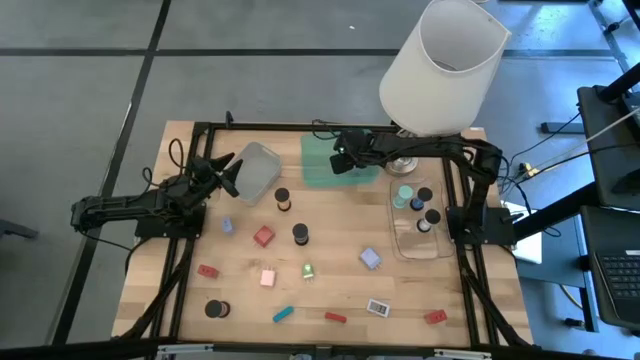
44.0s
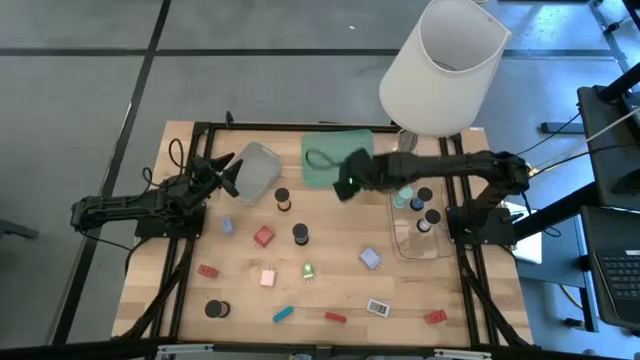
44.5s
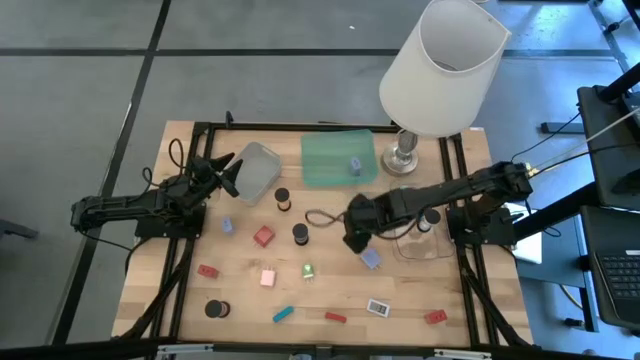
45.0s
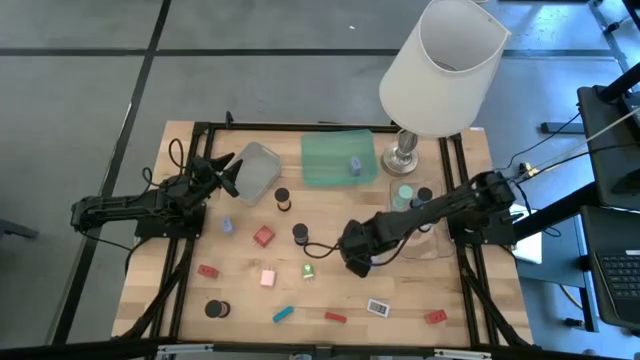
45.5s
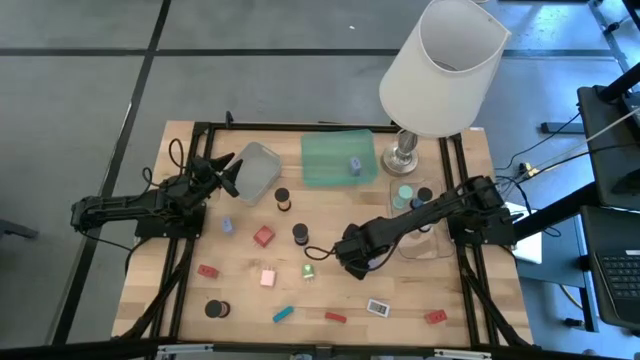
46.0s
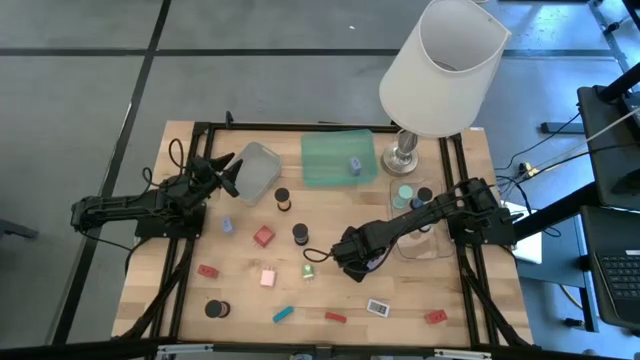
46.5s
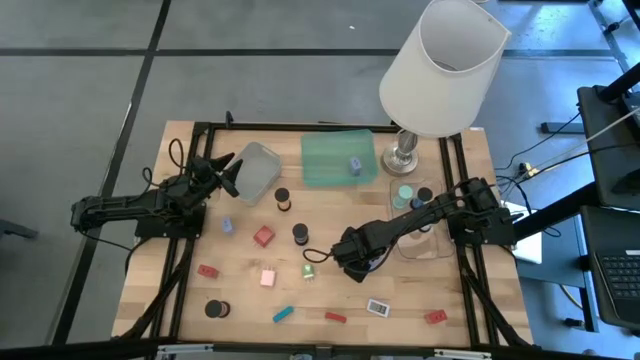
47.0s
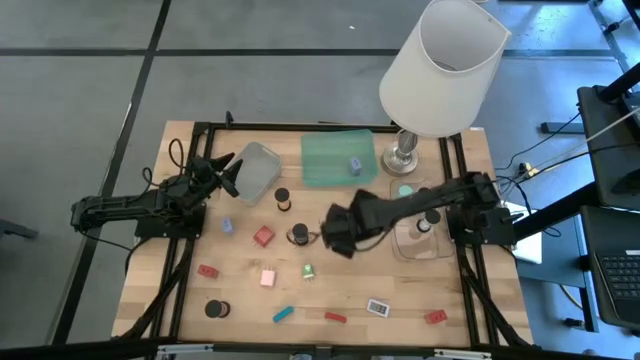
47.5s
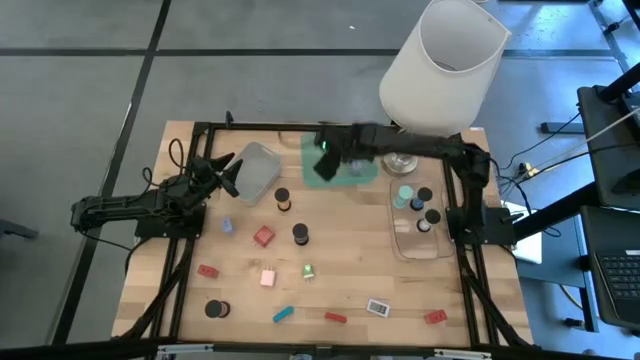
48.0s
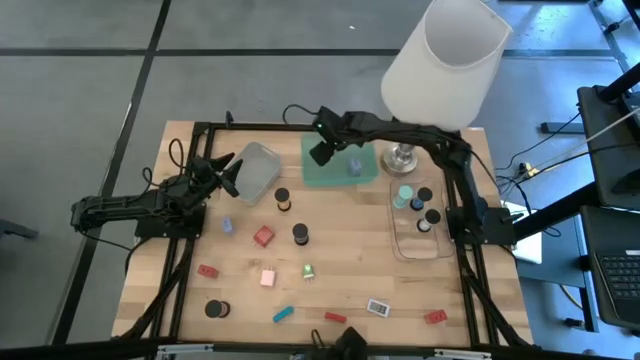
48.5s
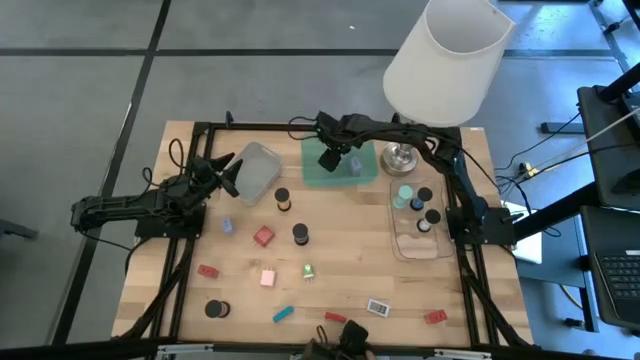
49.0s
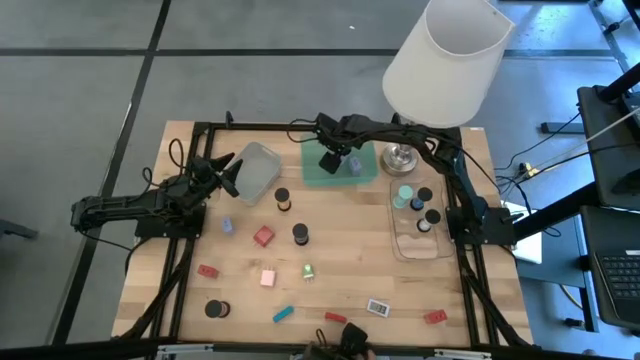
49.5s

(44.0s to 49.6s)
Task: Pick & Place Office items
Put the right purple charger adapter into the green bin

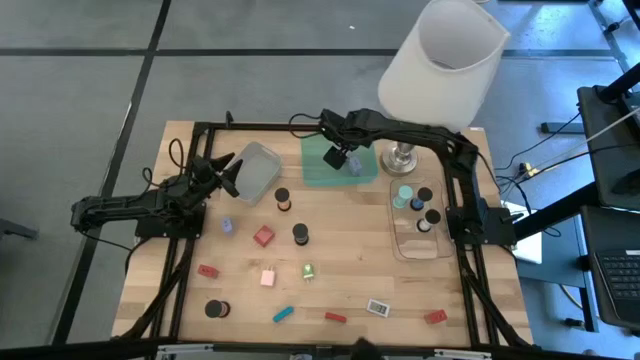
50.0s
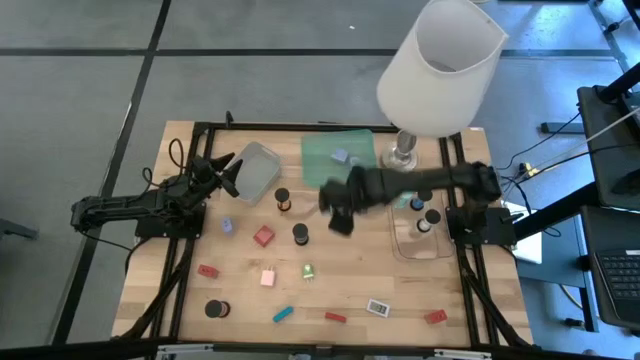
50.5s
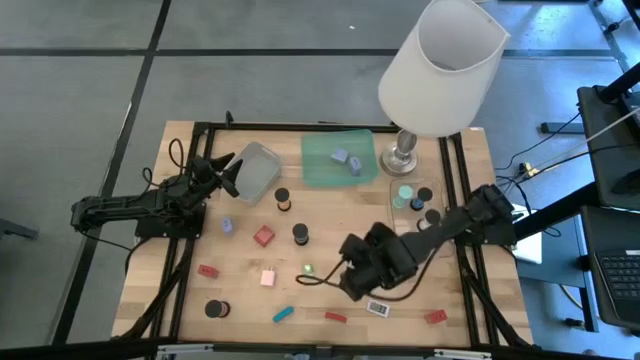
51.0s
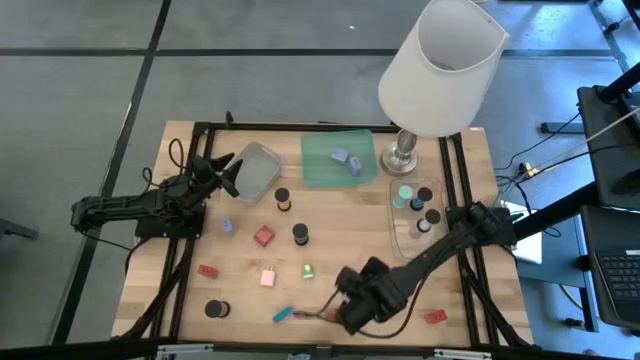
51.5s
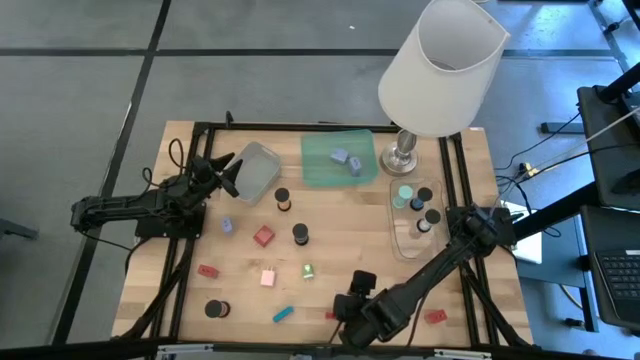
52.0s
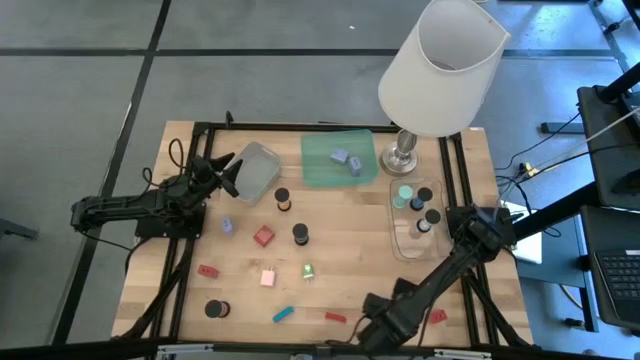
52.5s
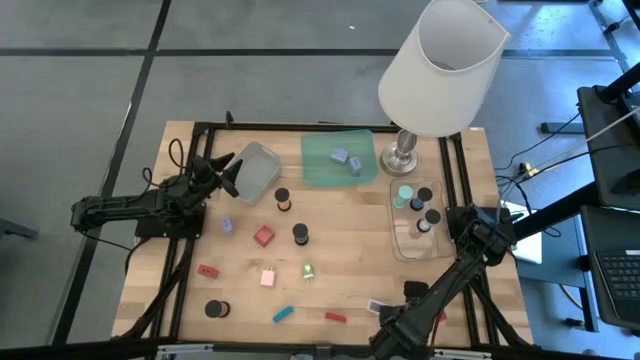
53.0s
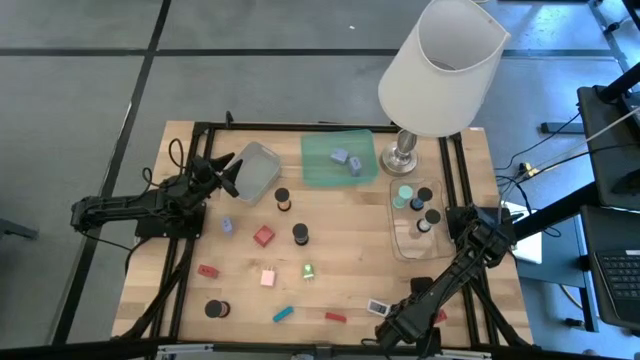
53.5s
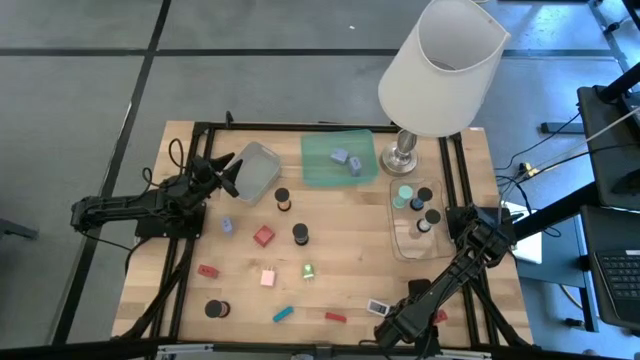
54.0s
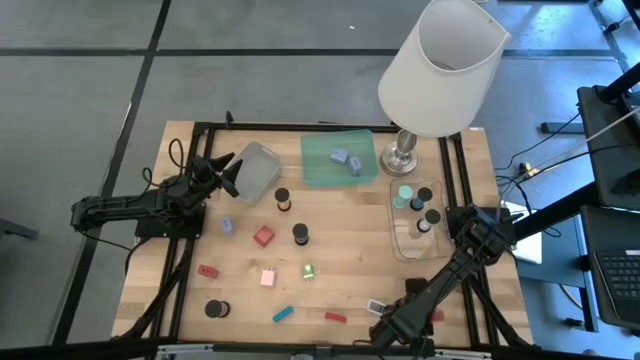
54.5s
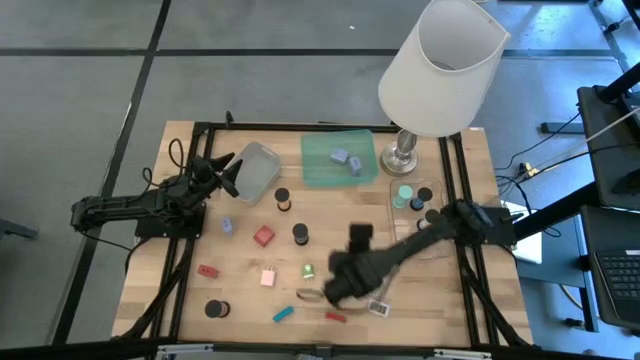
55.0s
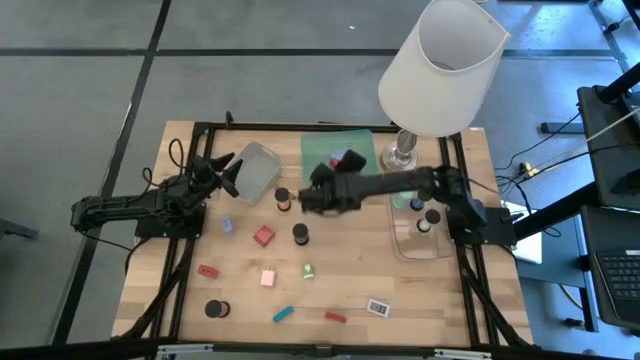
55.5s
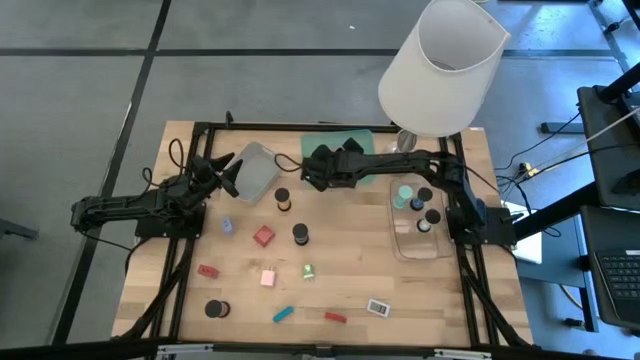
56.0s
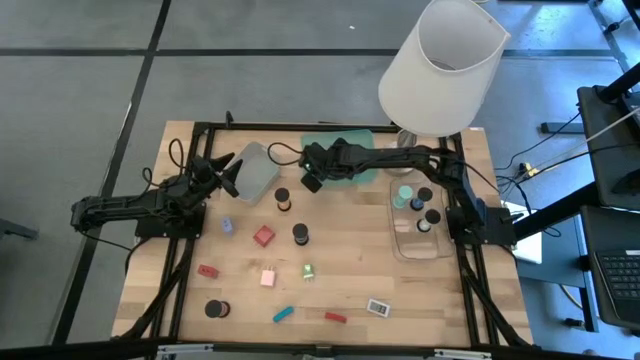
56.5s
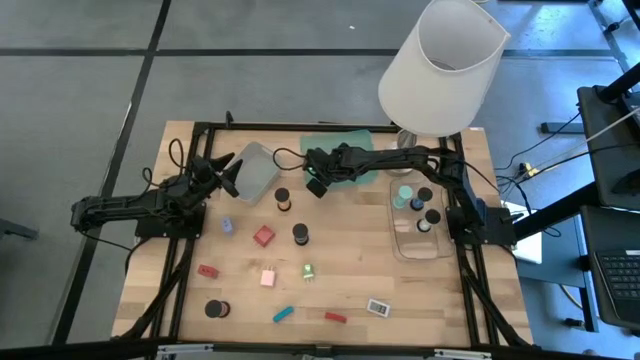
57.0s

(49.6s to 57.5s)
Put the right red charger adapter into the green bin

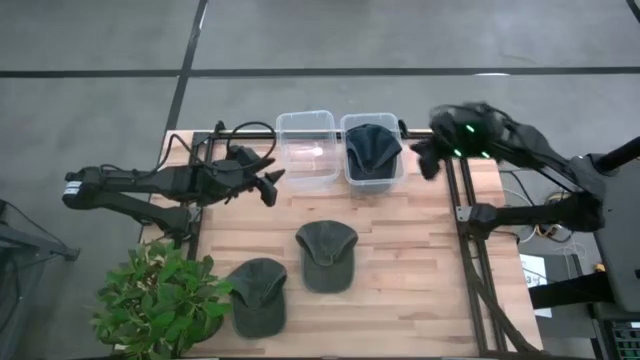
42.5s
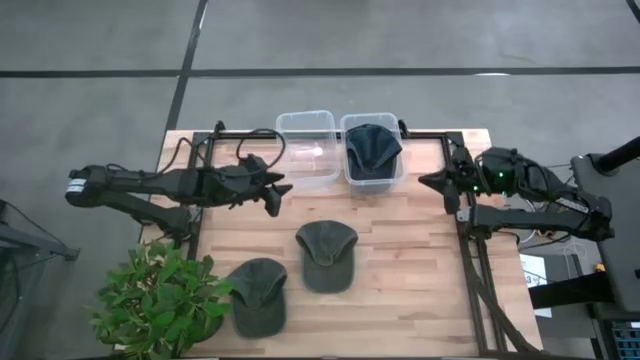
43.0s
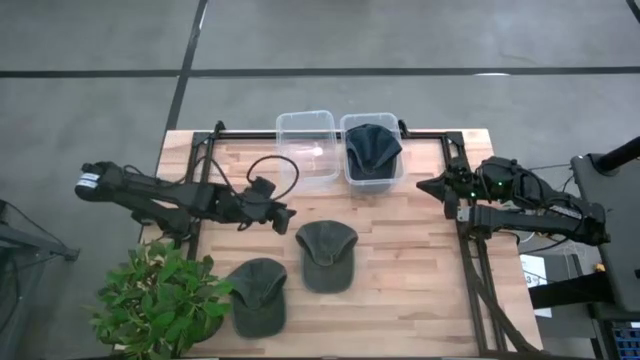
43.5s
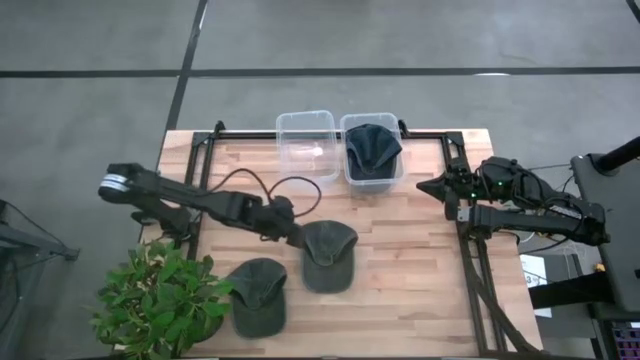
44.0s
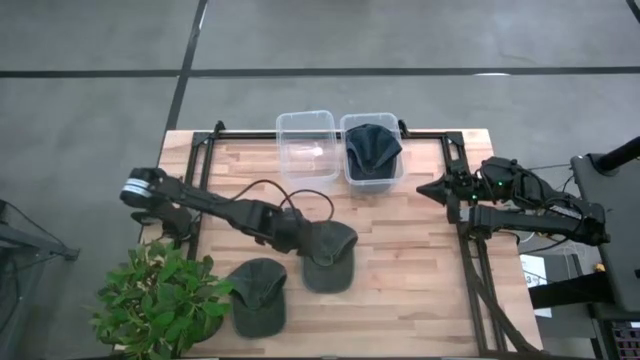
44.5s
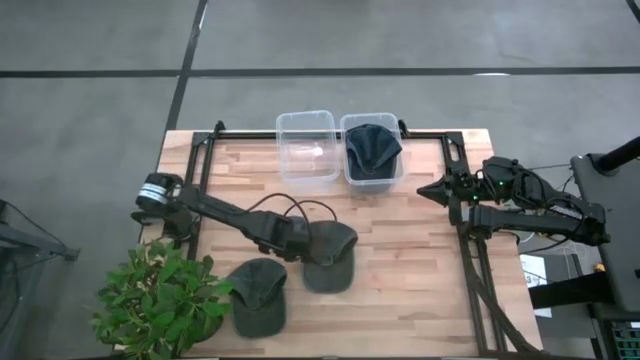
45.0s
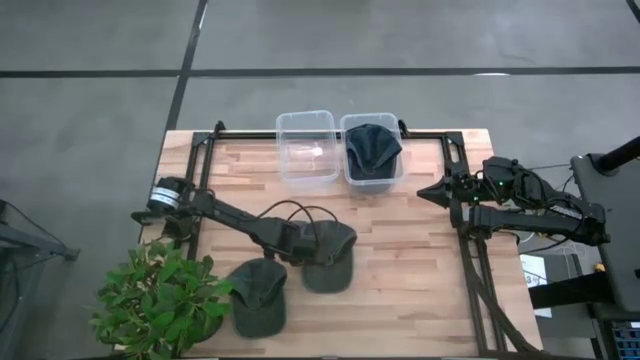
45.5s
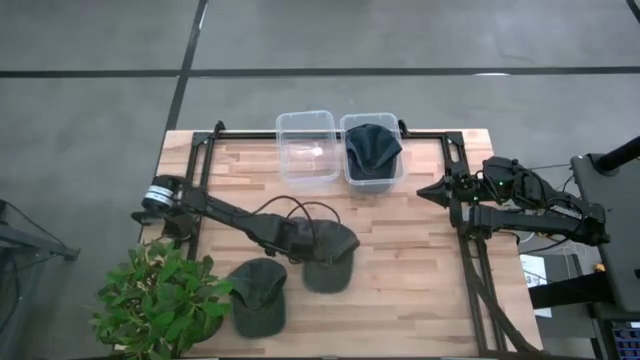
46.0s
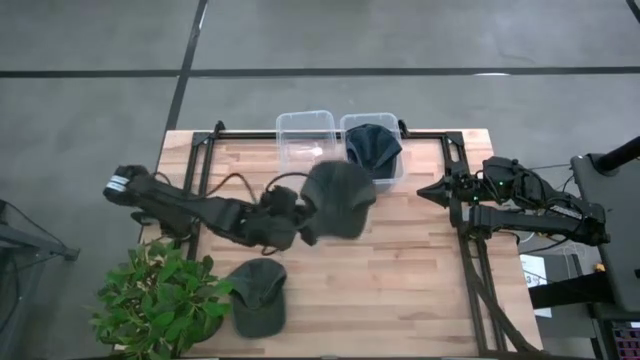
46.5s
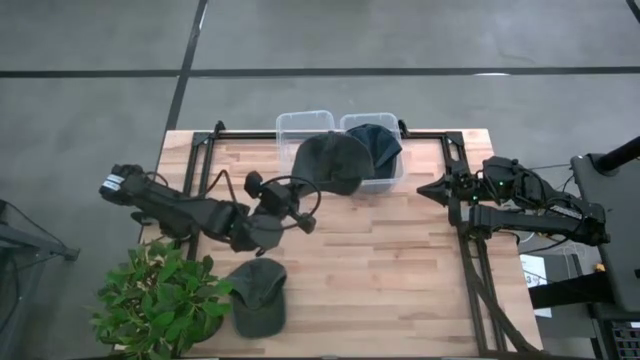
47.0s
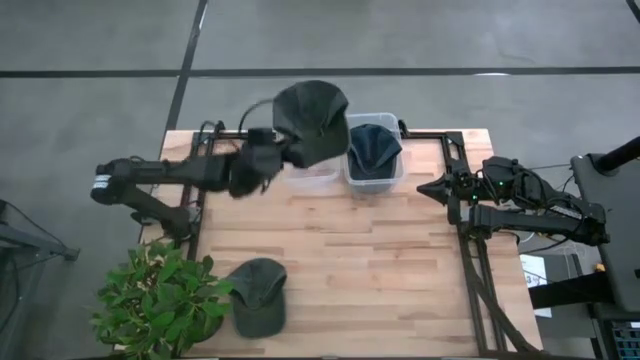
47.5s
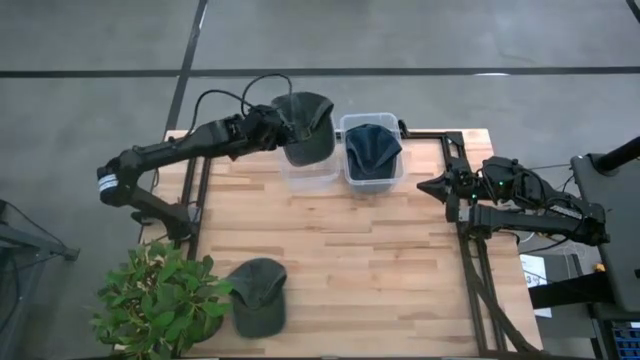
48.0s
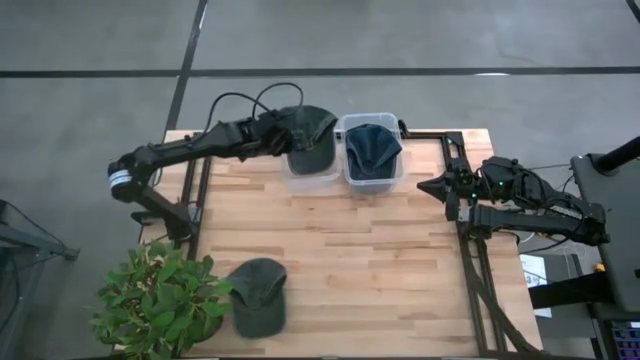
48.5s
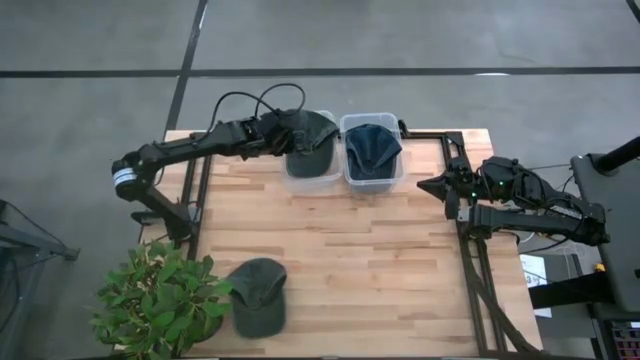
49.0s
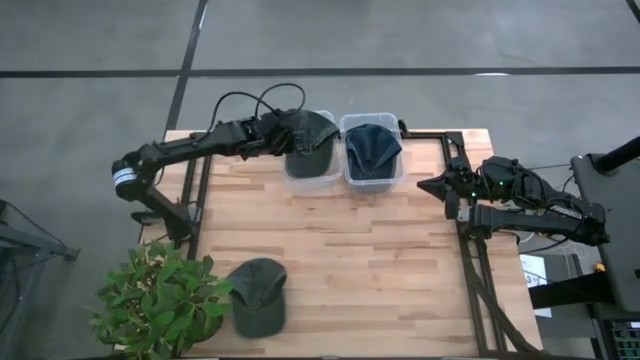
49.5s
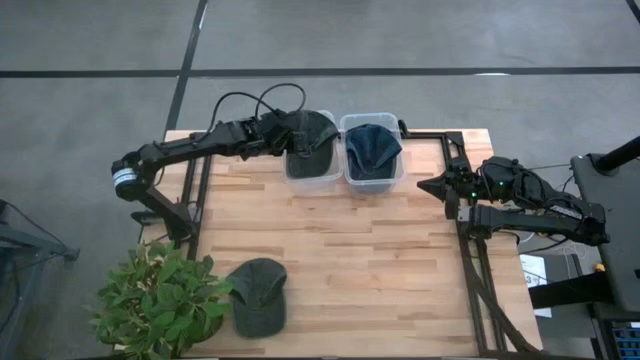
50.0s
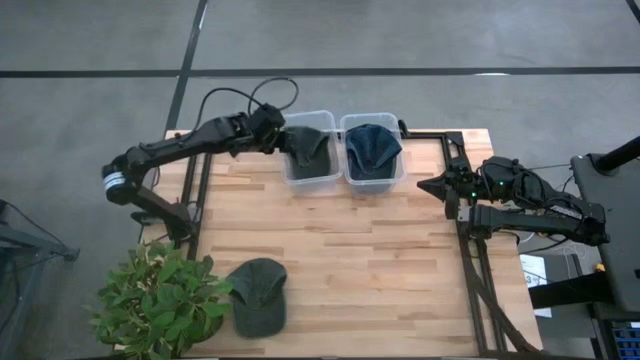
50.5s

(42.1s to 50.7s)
Task: Pick & Place hat
Put the top green cap into the left transparent bin
